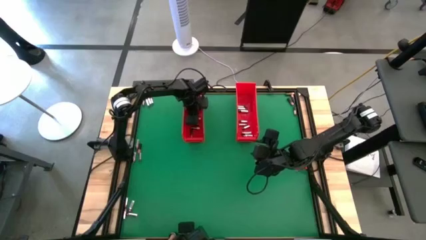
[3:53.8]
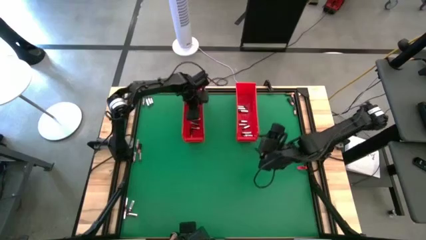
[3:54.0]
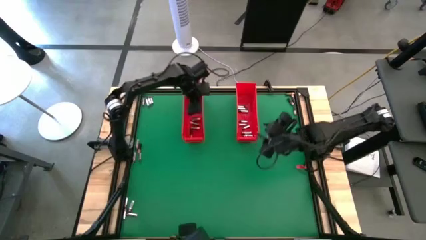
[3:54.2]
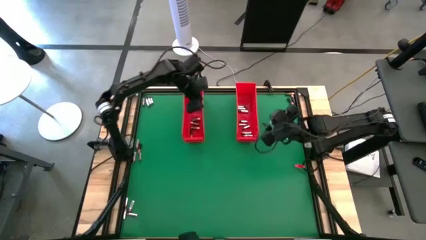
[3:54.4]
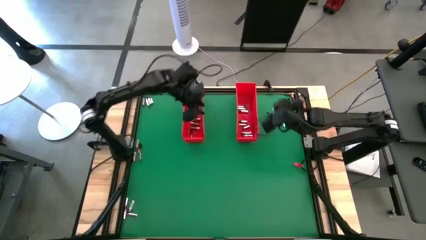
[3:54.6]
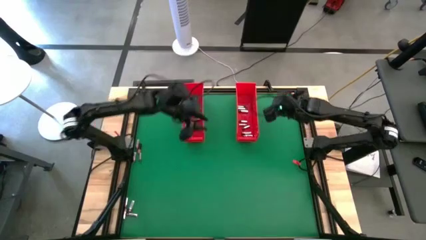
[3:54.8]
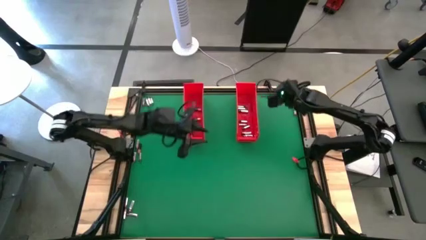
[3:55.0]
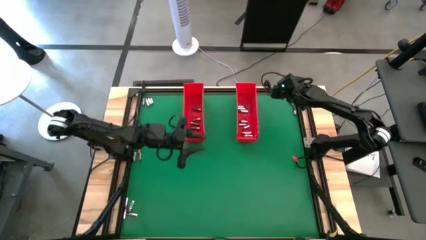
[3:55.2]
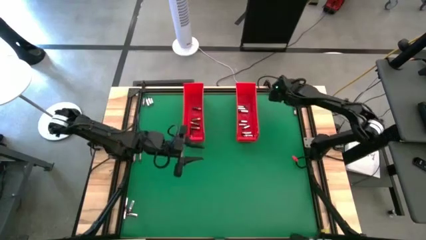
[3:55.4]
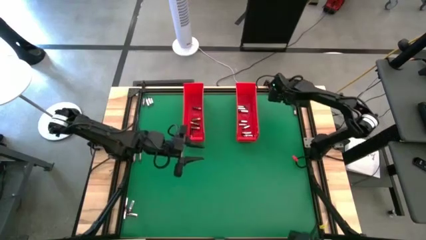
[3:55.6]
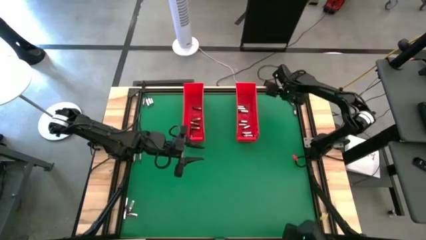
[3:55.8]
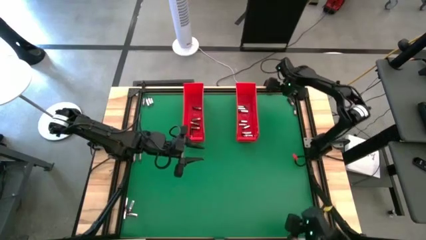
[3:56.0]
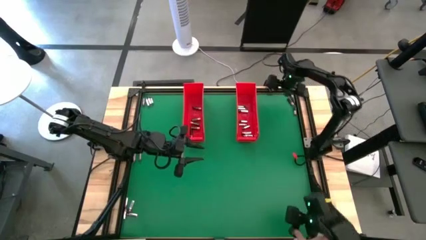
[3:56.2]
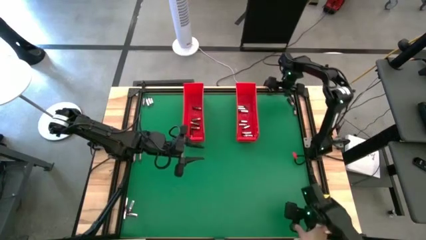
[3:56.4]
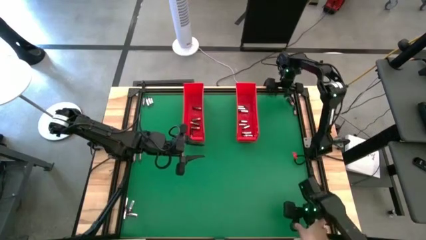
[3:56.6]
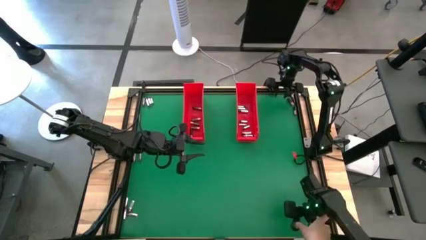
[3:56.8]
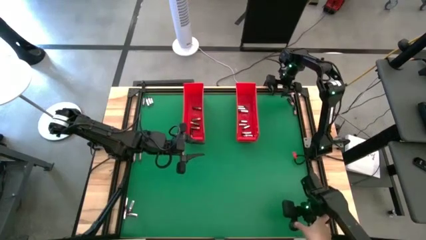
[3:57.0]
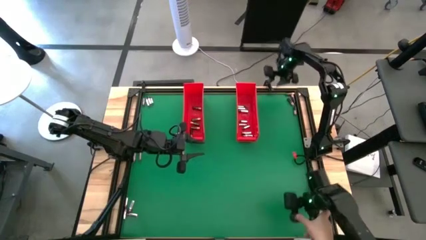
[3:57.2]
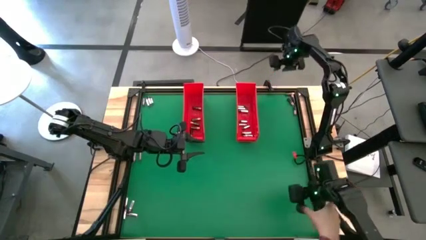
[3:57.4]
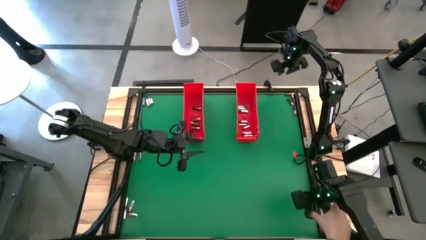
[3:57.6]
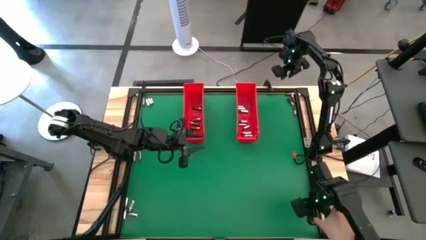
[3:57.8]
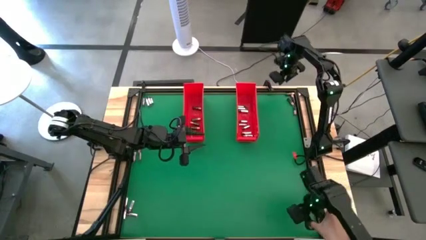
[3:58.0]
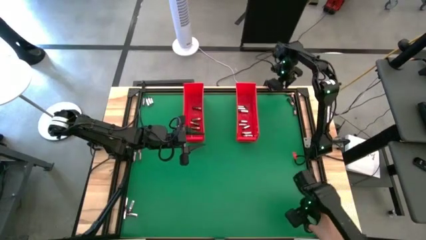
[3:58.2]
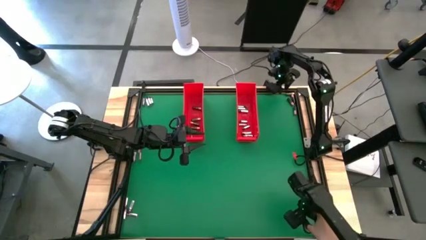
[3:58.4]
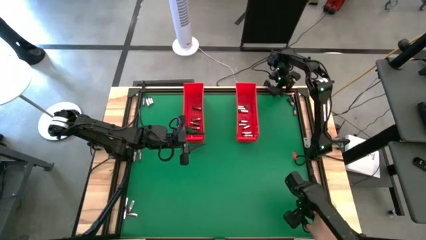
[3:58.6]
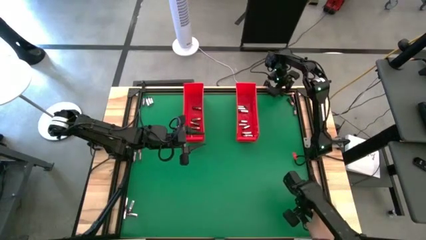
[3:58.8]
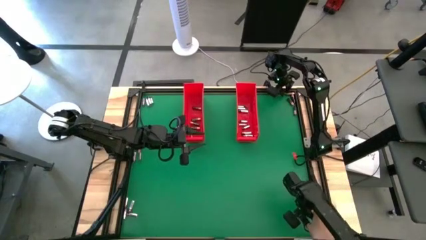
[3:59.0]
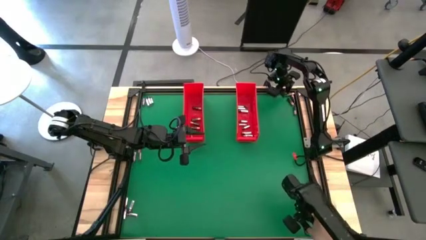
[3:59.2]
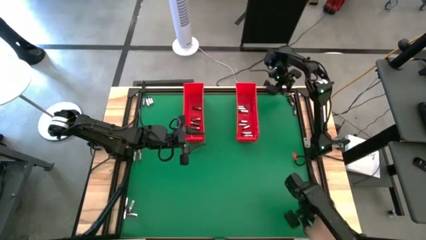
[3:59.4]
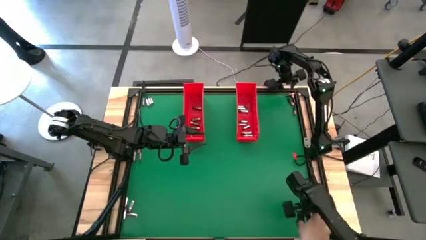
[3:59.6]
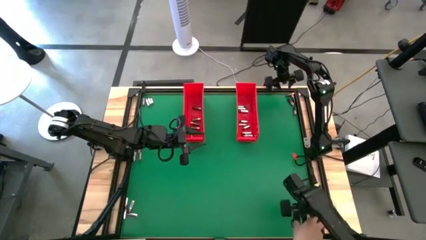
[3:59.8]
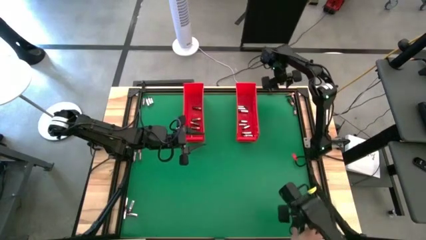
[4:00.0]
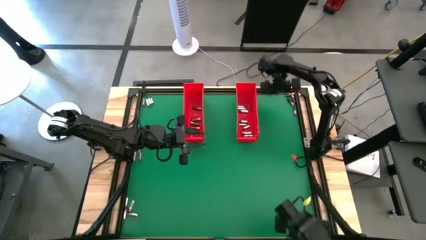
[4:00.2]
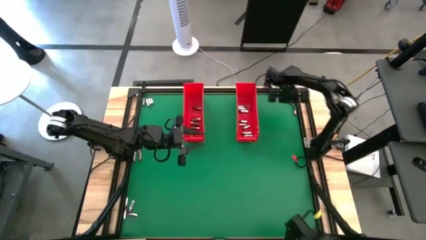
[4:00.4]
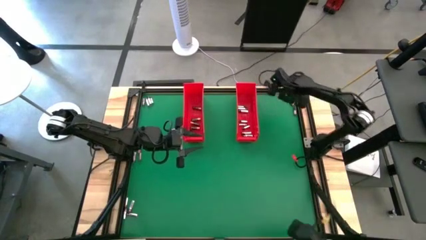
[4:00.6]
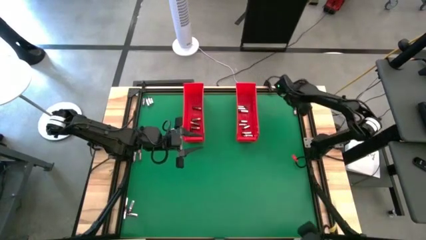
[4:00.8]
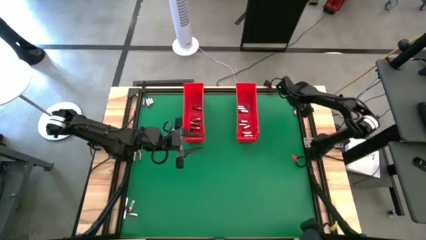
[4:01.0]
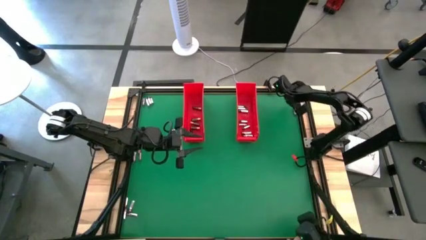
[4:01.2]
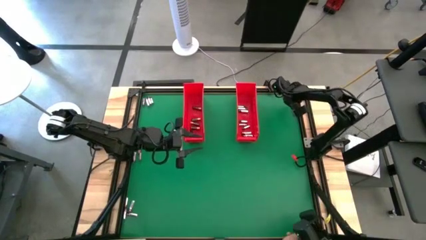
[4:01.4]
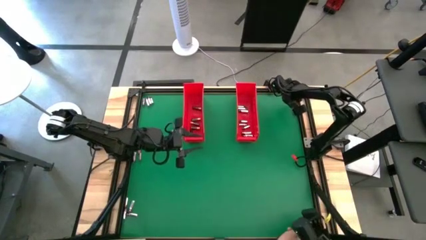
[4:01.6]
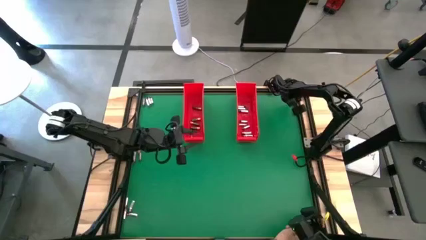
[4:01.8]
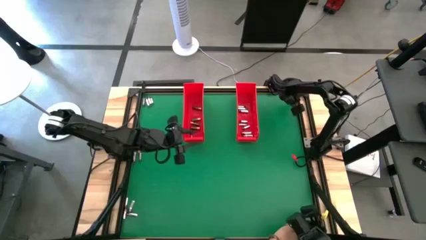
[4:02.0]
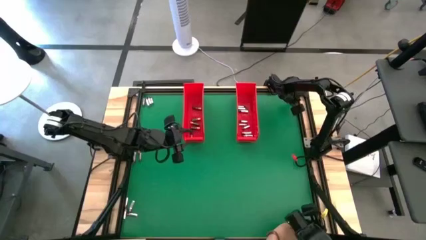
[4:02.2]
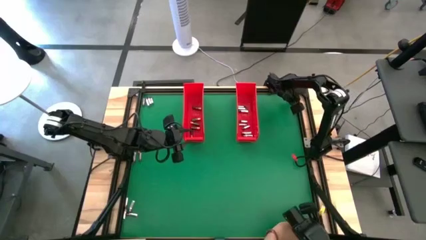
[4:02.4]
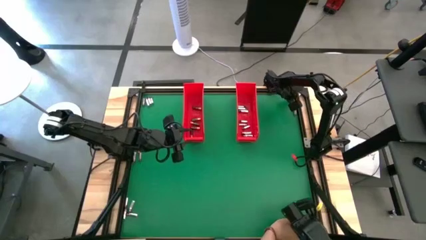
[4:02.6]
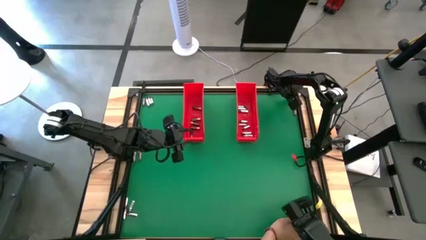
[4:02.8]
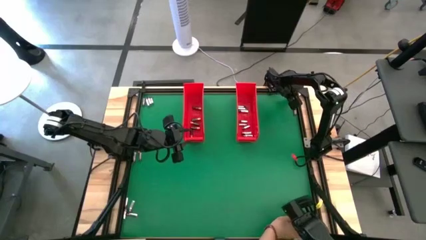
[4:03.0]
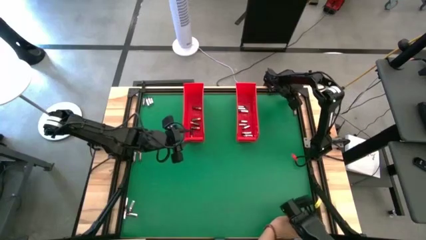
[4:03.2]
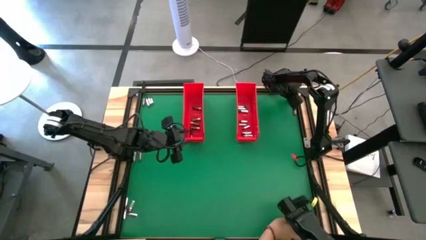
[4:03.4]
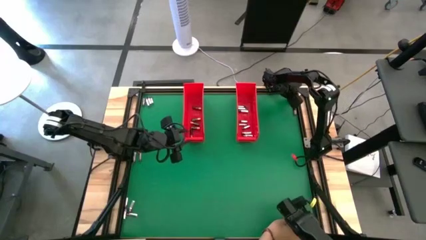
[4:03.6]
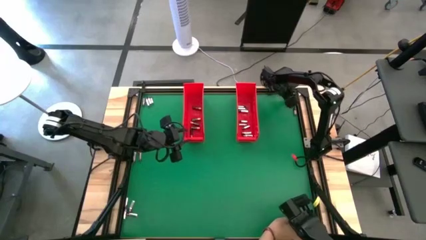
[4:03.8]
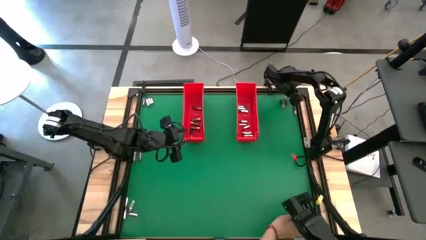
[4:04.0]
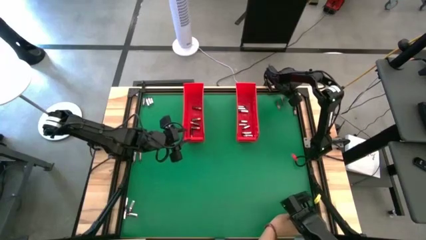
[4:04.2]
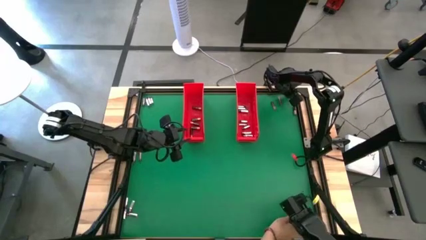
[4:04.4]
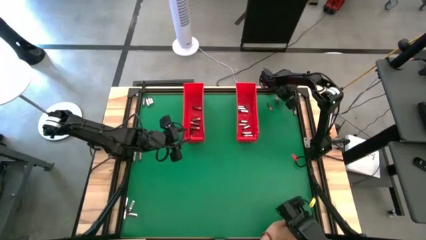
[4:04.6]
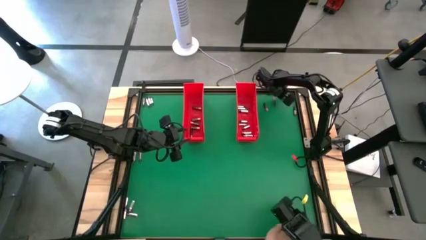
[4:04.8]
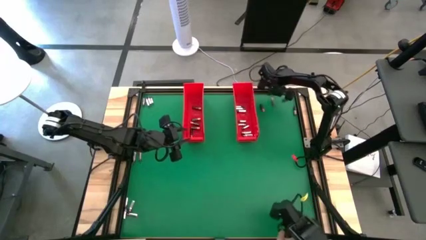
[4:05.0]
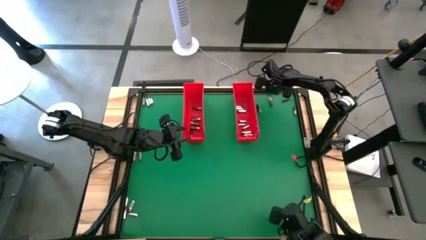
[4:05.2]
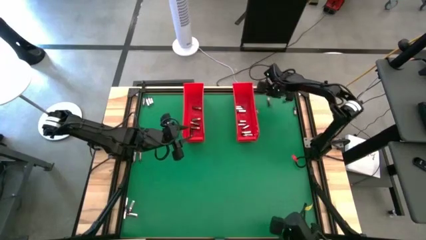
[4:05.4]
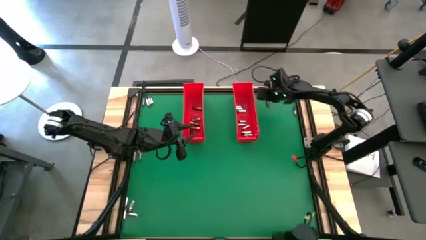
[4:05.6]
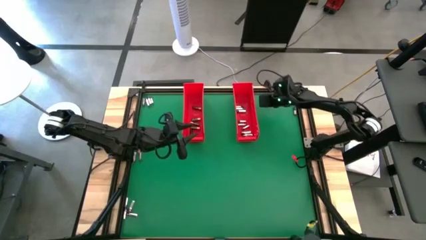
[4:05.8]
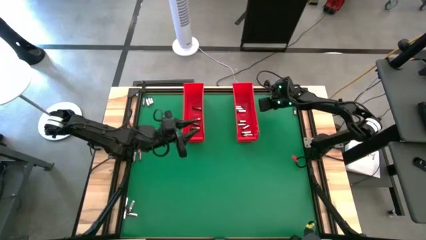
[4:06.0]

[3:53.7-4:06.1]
Task: Sort batteries
Put the brown battery into the left red bin

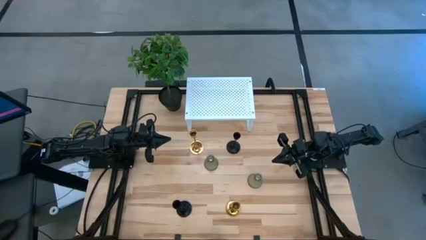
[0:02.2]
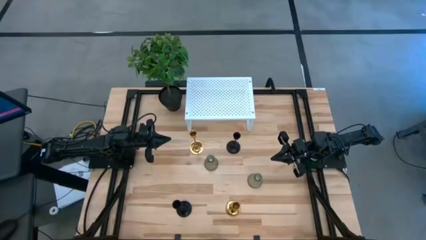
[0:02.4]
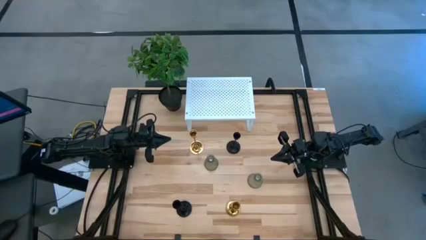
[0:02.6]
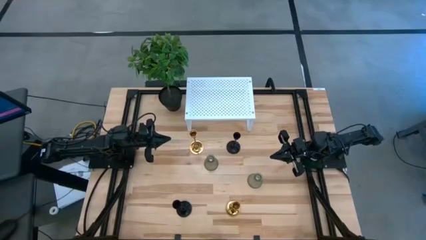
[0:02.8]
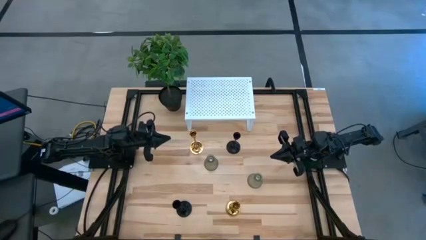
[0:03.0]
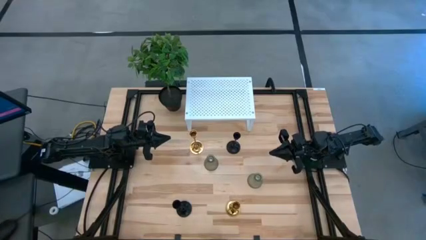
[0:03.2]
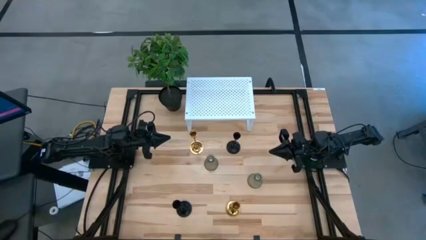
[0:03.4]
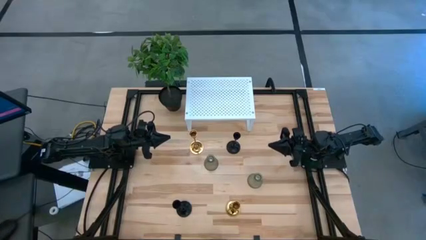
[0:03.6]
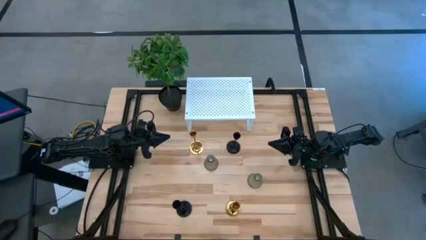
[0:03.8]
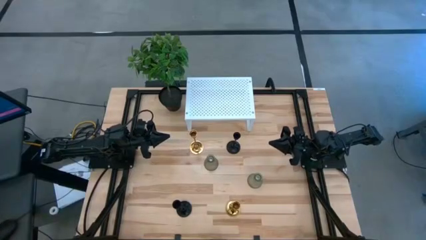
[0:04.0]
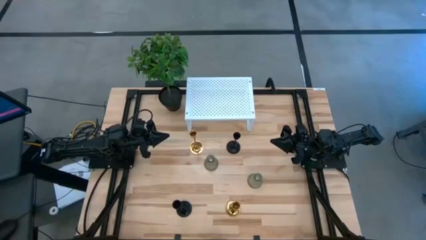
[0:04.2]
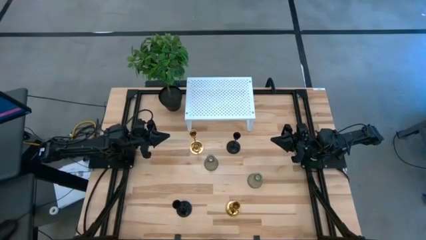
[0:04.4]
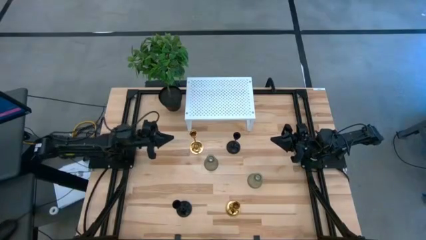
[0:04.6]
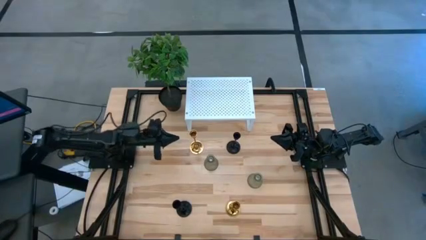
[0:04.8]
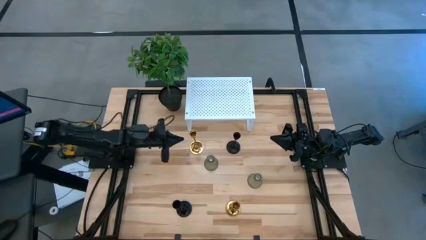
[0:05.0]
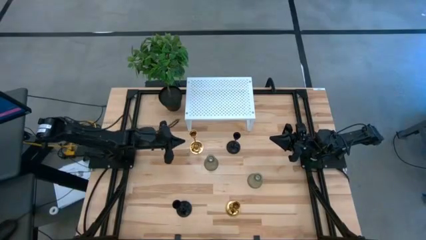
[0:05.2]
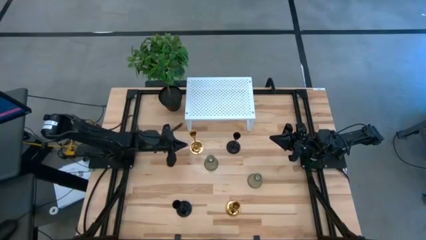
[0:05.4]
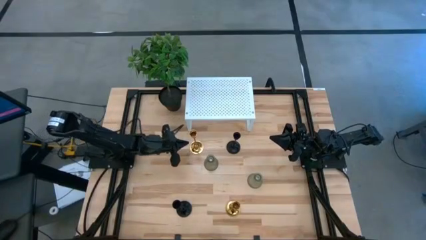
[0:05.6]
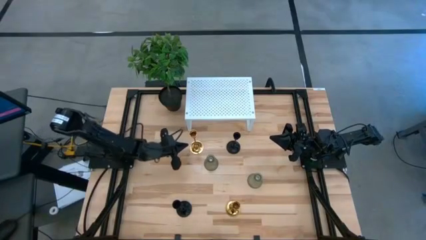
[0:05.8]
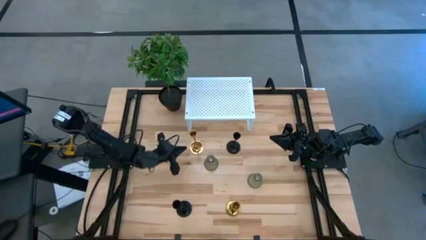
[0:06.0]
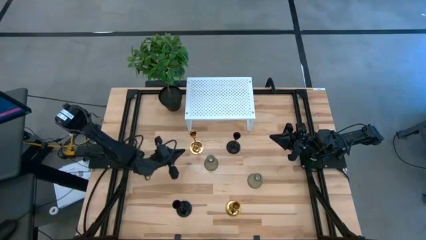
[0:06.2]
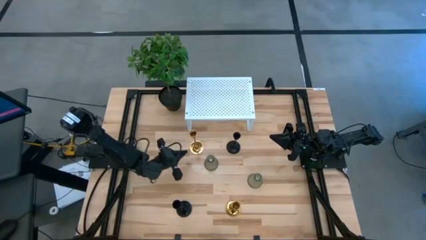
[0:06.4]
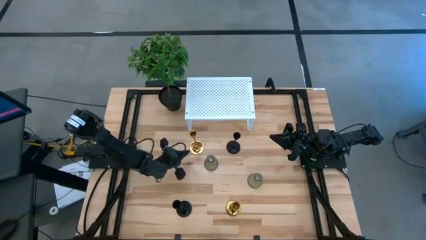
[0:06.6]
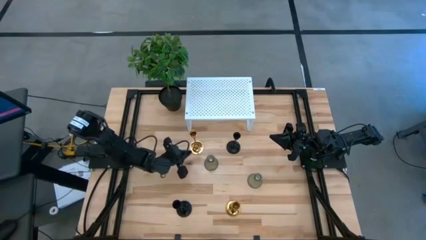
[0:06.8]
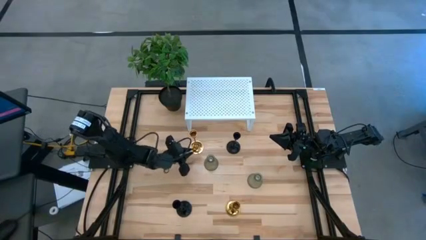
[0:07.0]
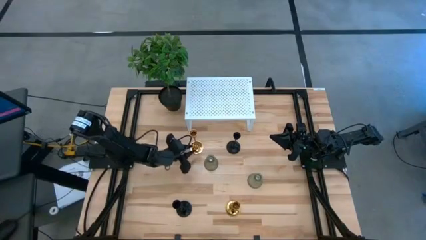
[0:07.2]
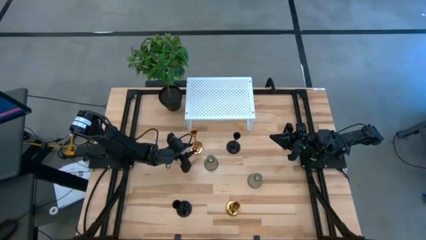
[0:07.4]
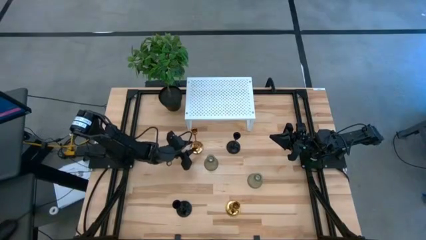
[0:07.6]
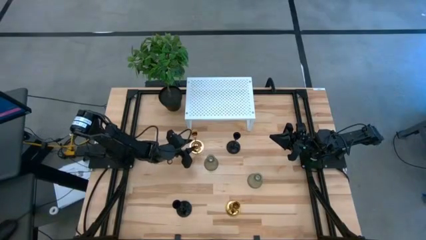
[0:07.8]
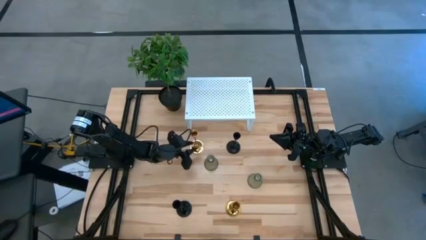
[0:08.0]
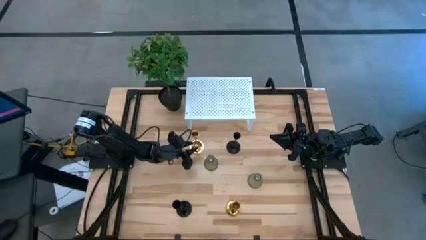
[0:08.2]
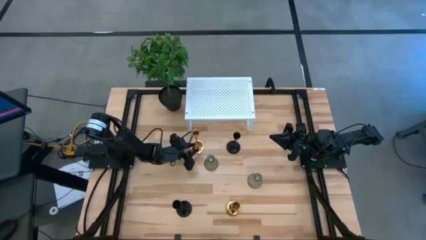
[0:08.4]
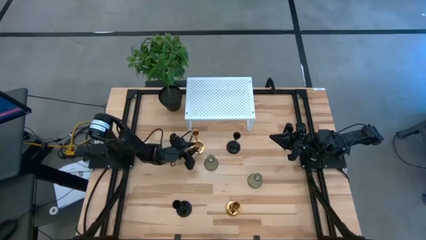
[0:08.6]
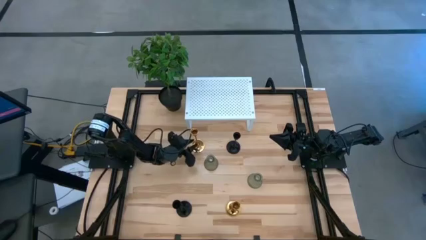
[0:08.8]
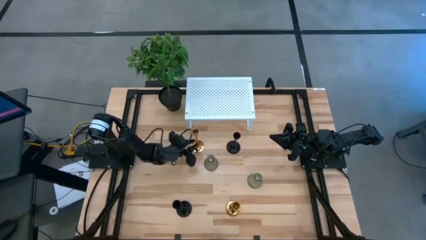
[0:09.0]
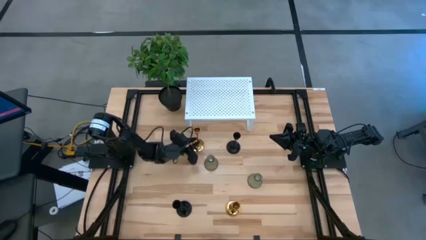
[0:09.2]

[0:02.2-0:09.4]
Task: Pick & Place candle stick holders
Put the top gold candle holder on the shelf
